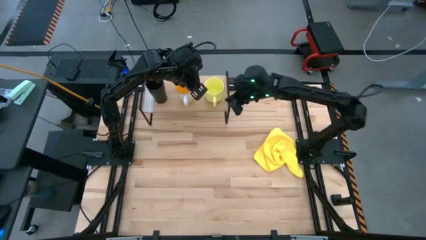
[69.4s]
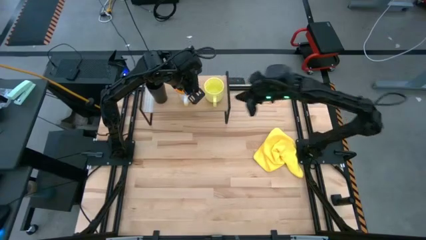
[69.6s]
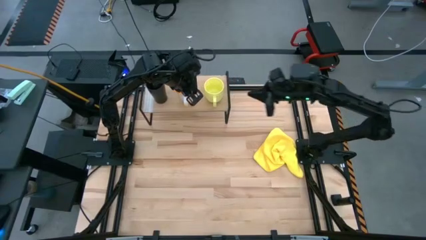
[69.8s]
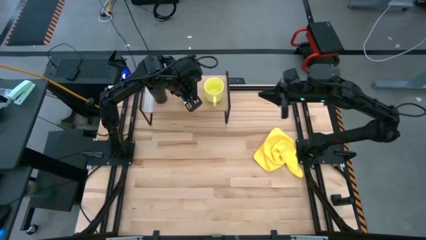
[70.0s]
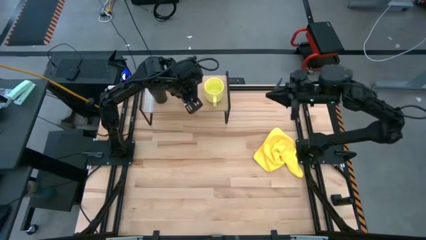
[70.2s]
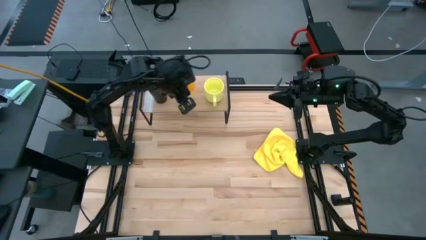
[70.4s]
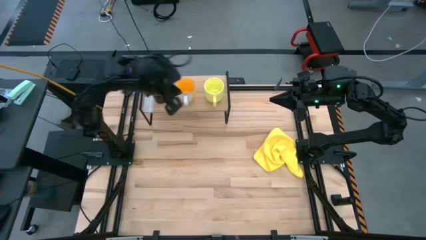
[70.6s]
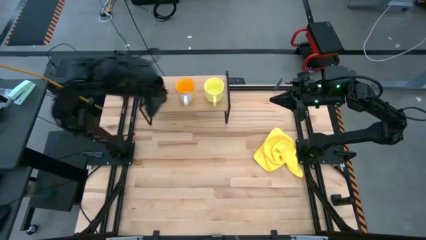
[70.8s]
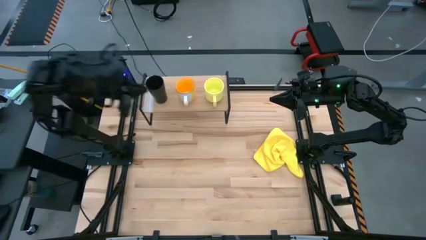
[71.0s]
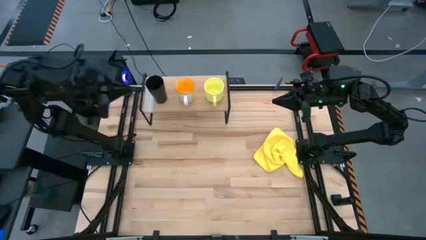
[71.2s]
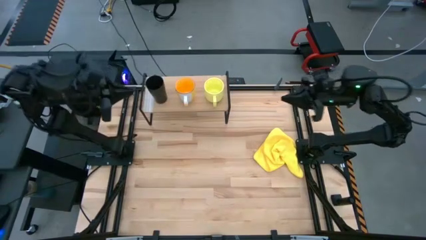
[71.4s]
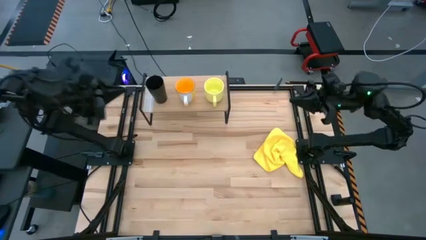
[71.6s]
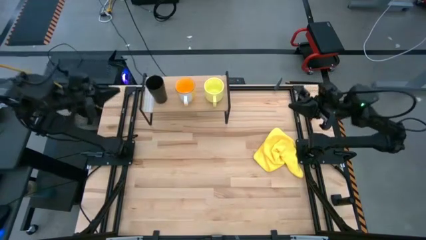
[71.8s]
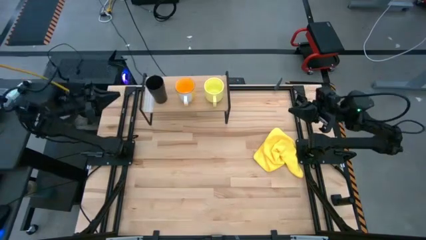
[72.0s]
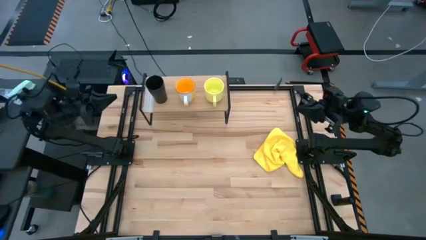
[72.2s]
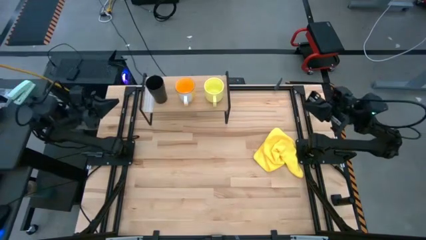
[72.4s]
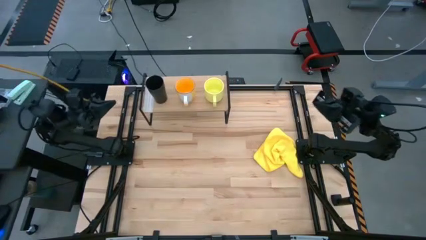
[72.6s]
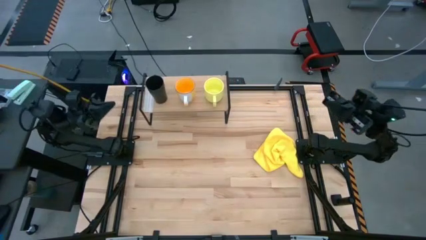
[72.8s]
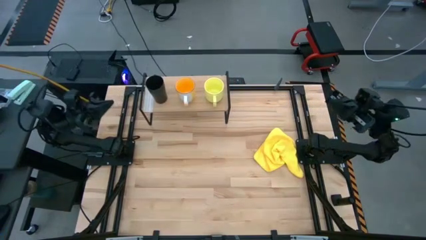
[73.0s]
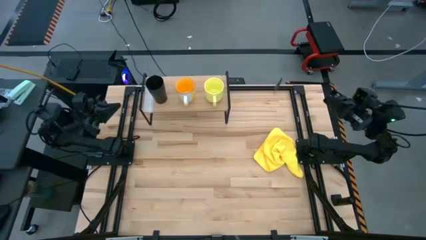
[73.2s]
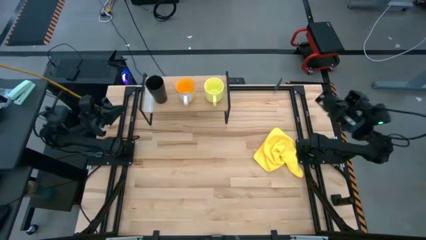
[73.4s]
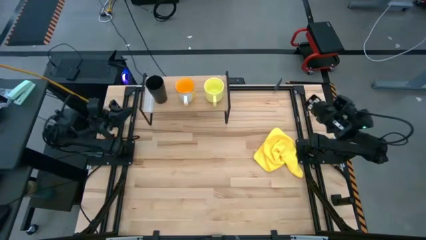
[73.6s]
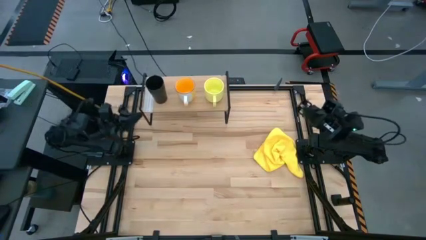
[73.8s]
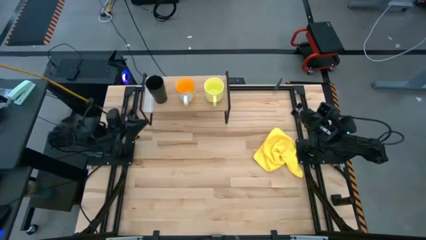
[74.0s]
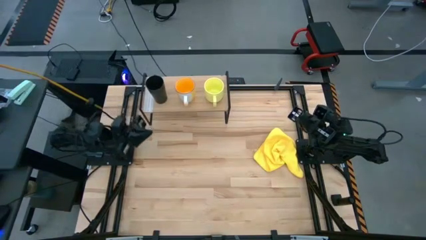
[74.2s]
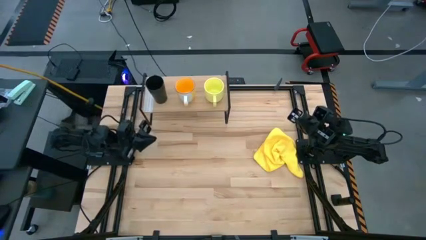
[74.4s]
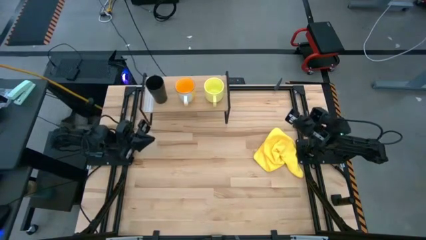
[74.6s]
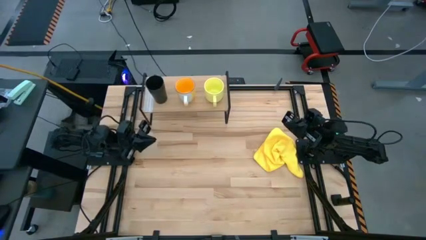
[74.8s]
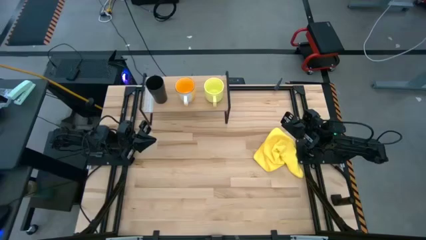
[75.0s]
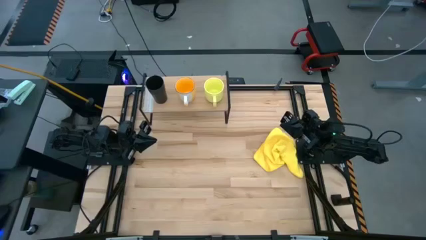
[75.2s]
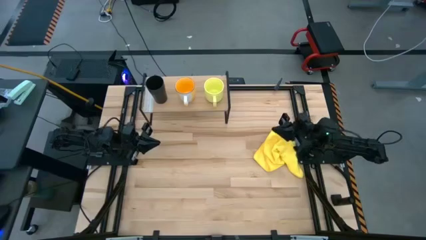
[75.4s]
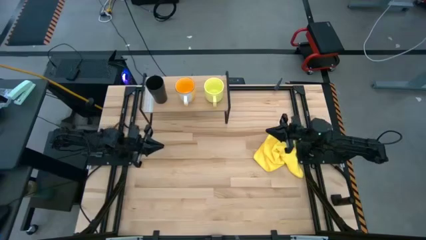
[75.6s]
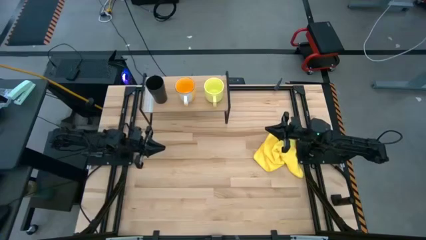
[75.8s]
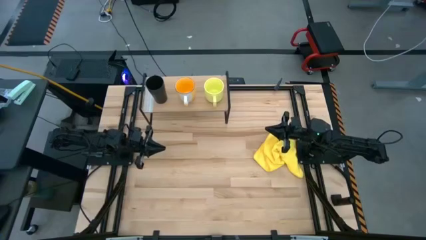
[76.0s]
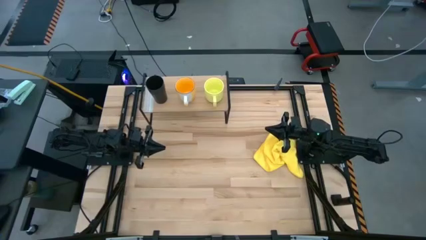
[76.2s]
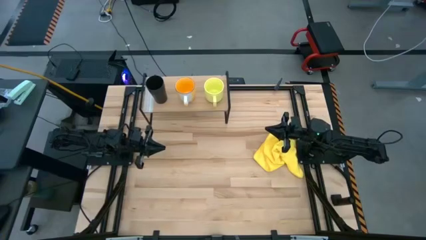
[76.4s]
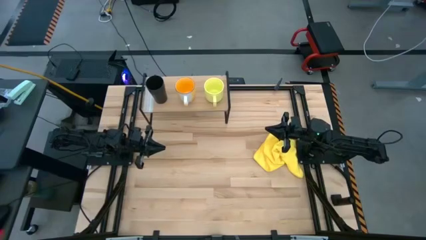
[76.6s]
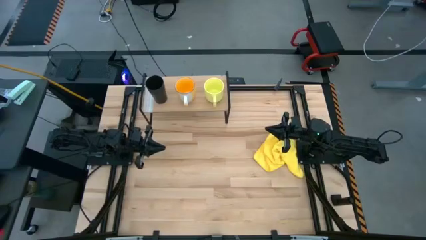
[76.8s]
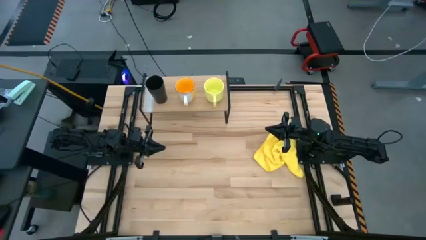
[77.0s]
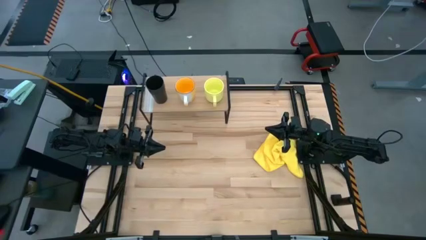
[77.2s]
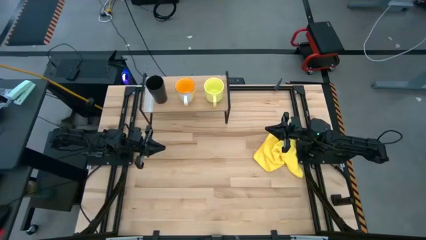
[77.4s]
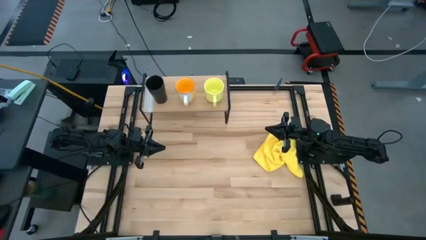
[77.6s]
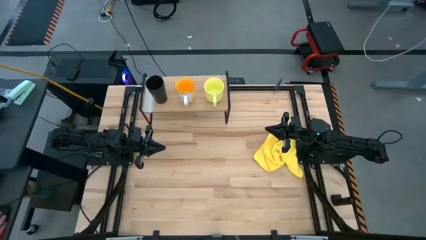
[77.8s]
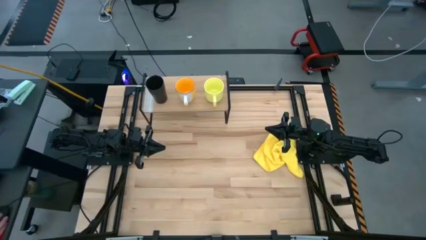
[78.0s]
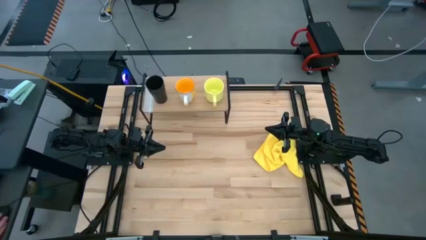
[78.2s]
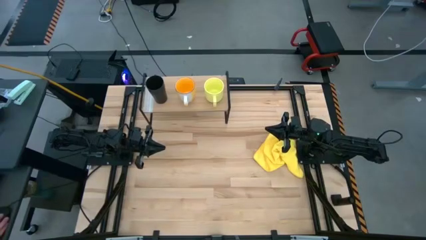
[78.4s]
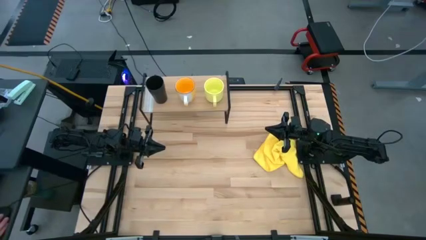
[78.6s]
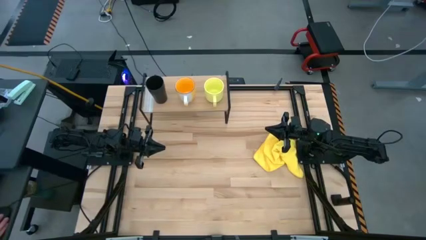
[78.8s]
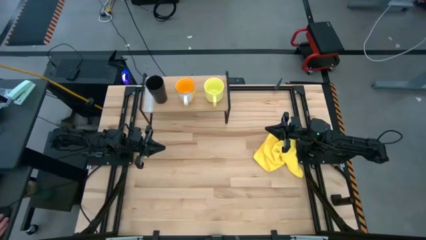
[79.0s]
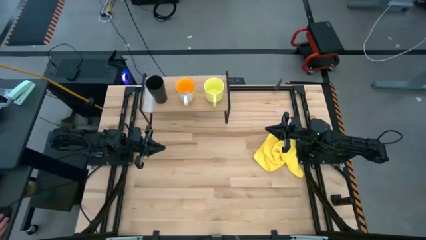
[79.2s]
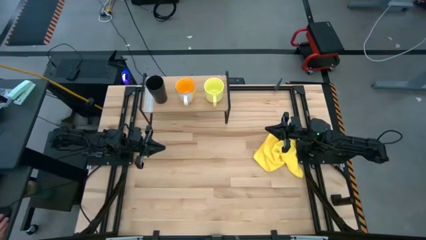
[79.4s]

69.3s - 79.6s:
Task: Stack small to large cups/mugs on shelf
Return to Home Position

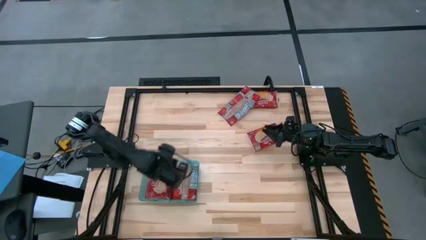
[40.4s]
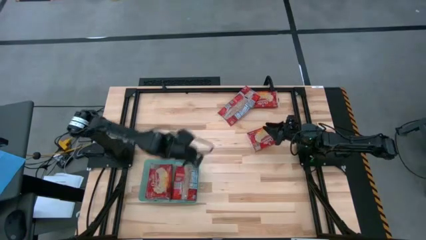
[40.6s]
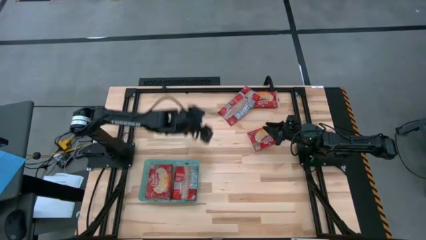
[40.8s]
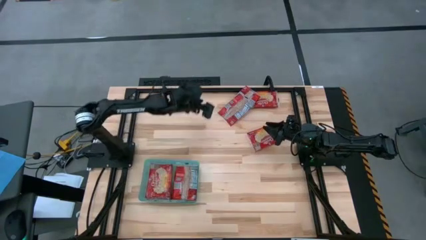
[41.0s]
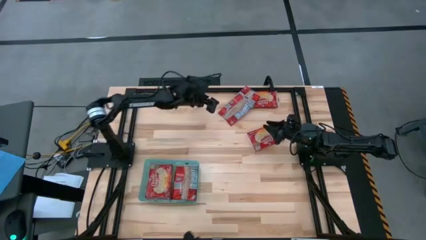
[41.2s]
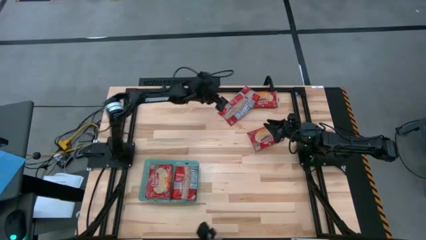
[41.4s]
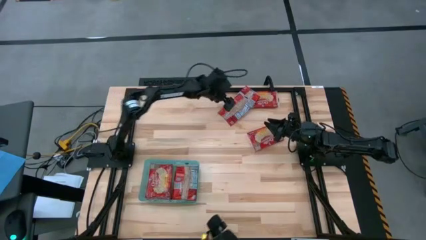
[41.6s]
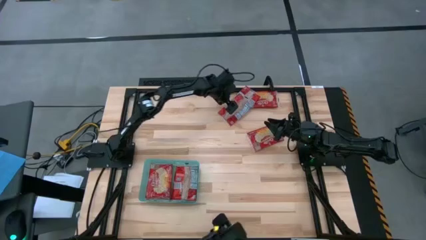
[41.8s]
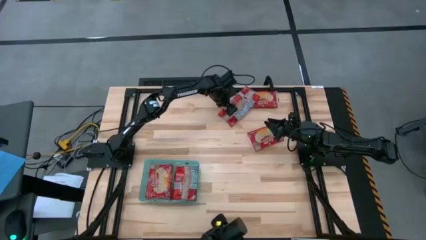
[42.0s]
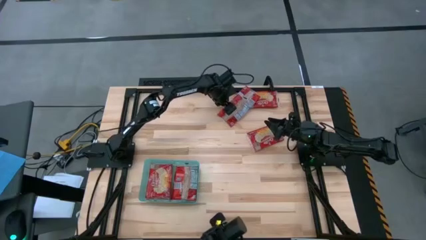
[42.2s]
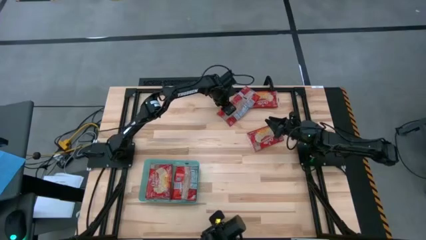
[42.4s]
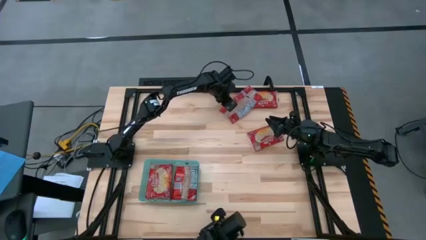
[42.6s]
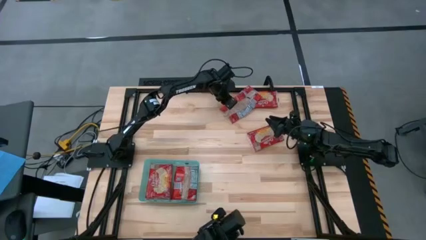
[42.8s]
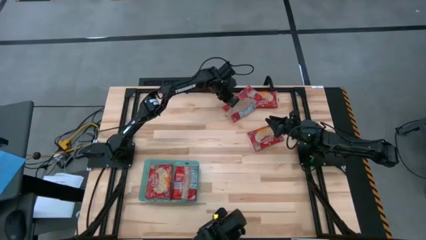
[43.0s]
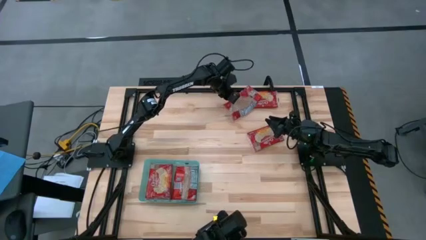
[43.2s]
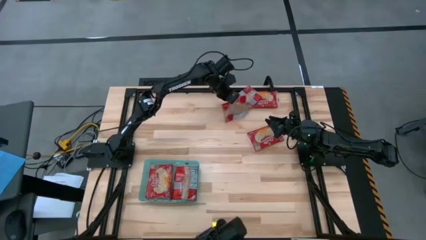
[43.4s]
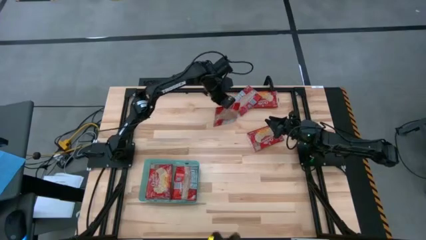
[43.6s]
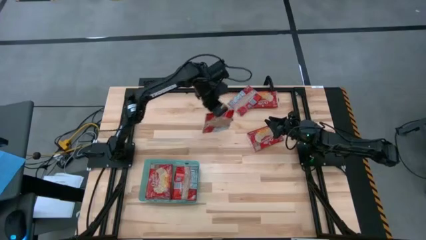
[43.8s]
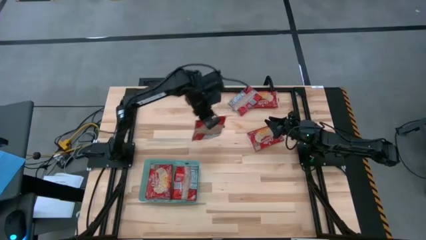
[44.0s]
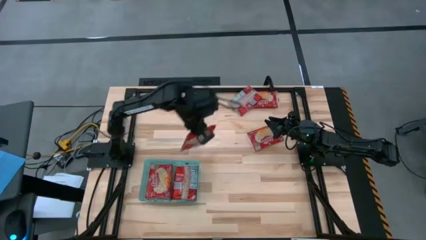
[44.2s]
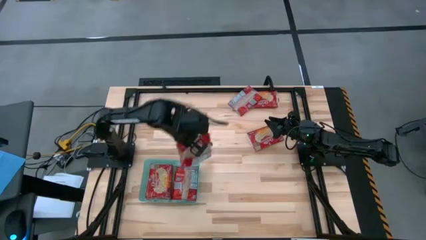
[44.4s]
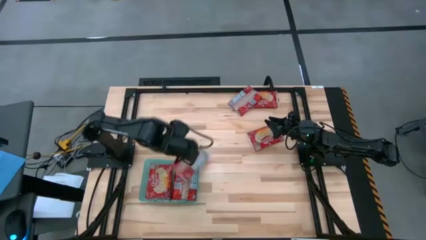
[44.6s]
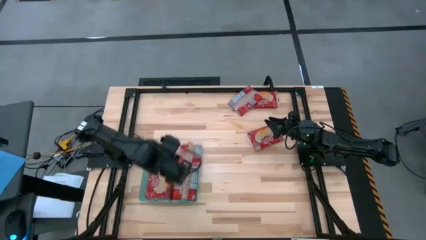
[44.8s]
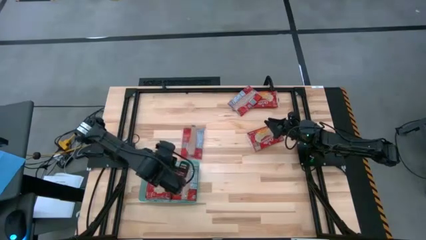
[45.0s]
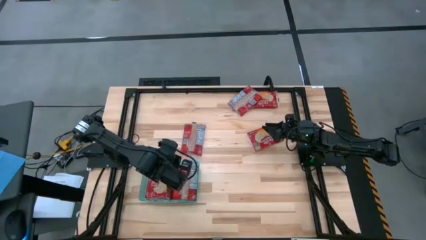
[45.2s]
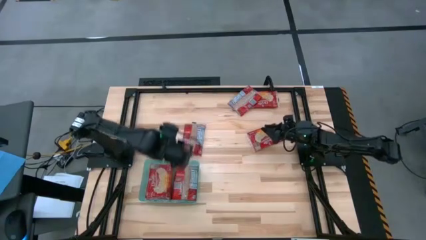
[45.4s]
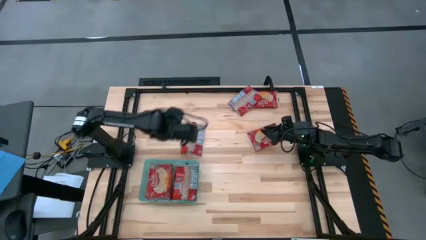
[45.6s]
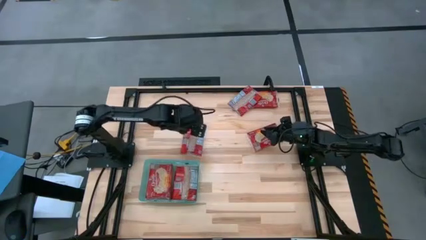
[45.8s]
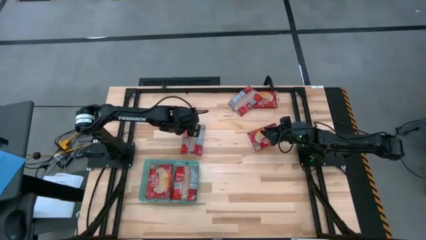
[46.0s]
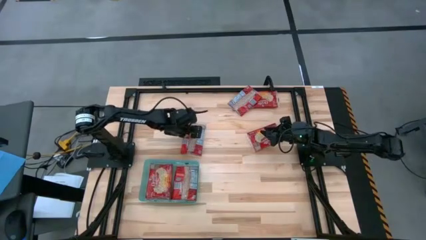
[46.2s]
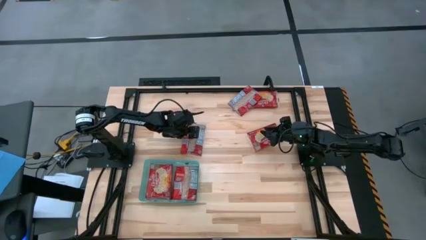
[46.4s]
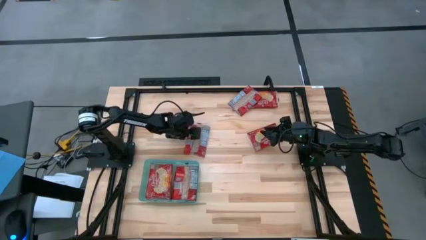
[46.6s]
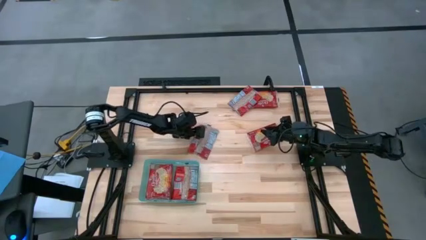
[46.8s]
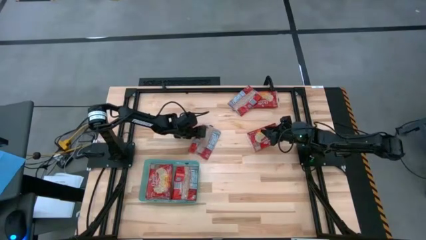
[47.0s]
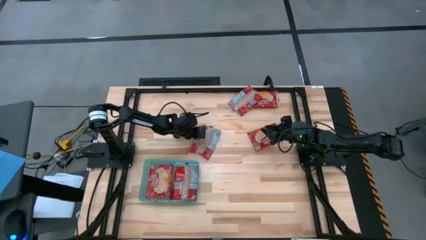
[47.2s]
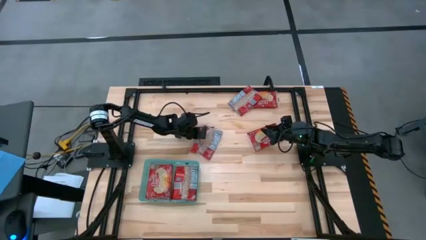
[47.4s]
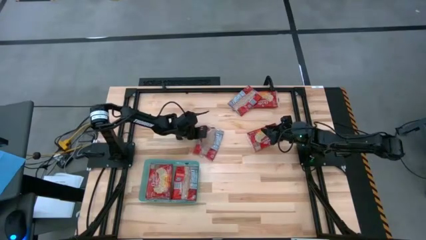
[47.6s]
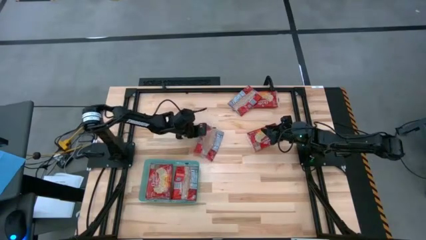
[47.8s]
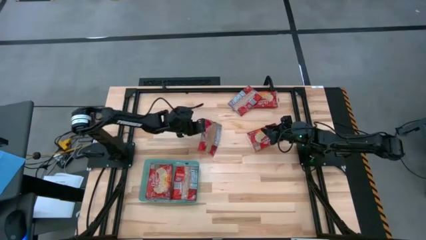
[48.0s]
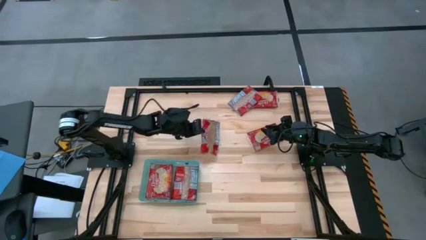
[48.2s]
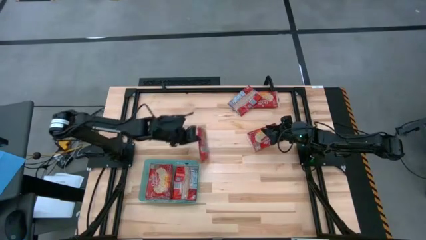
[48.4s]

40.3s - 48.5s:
Task: Sort popcorn bags into baskets
Put the red popcorn pack into the green bin
